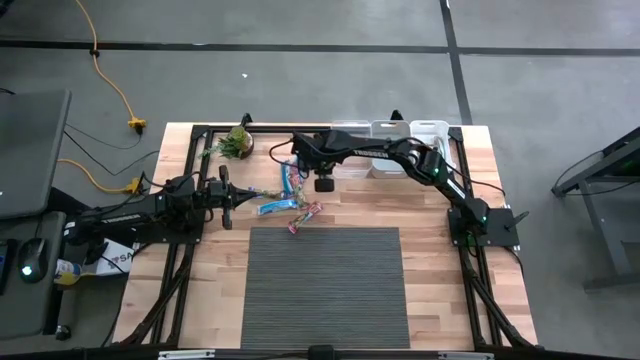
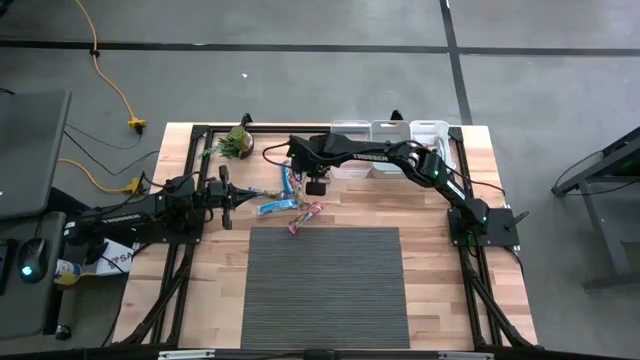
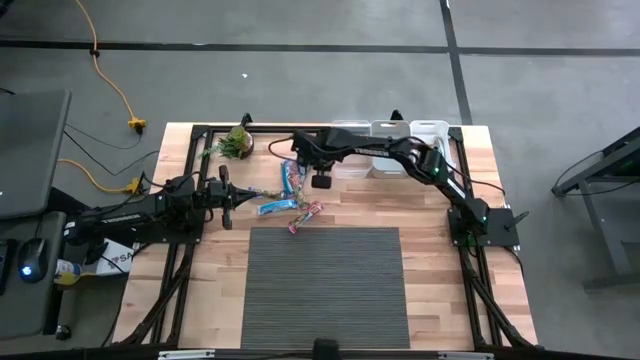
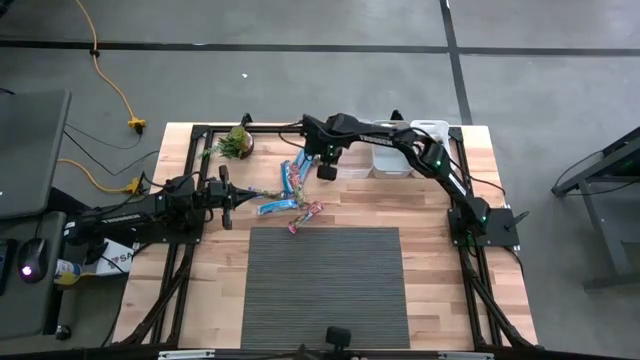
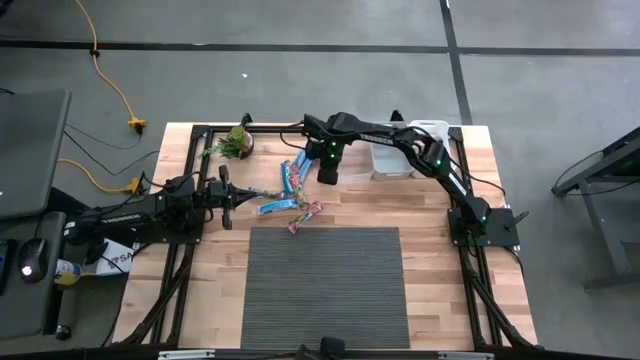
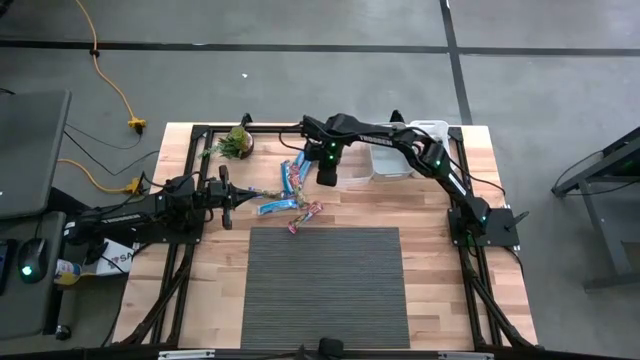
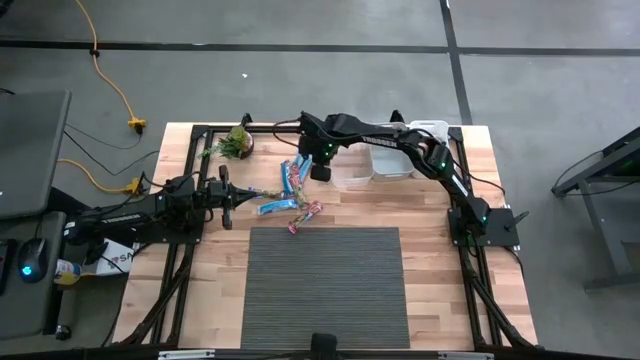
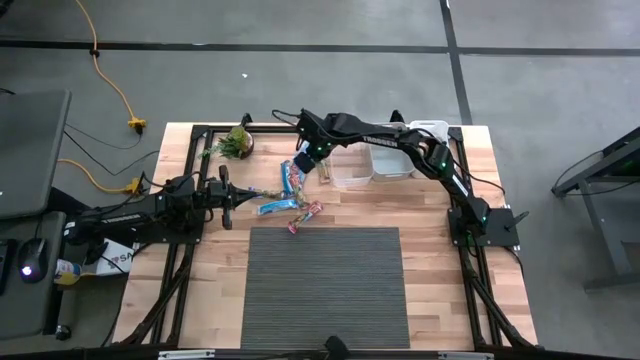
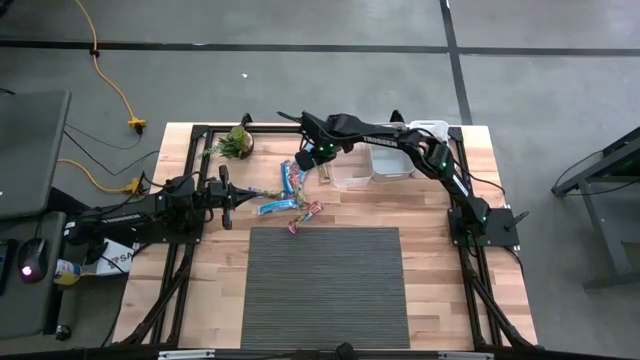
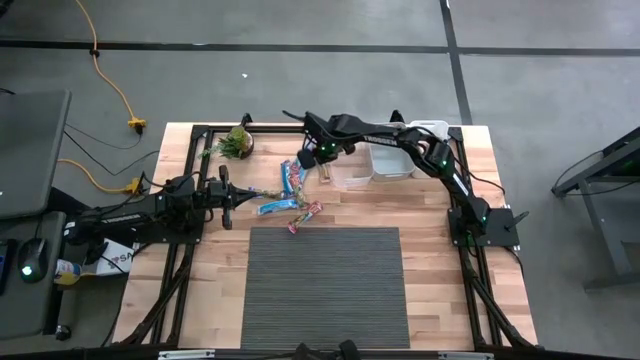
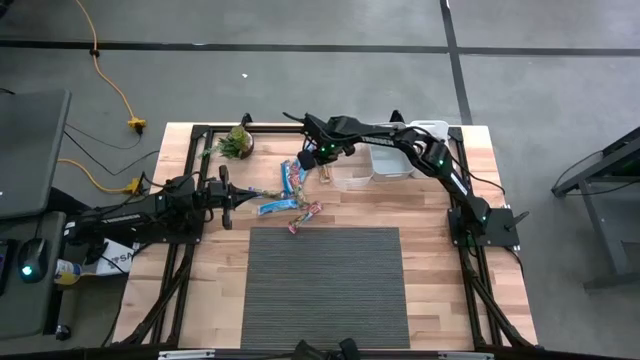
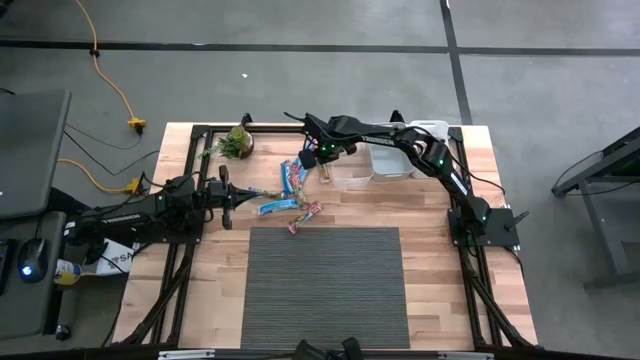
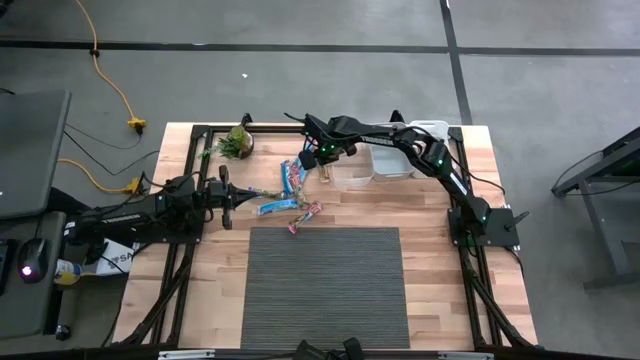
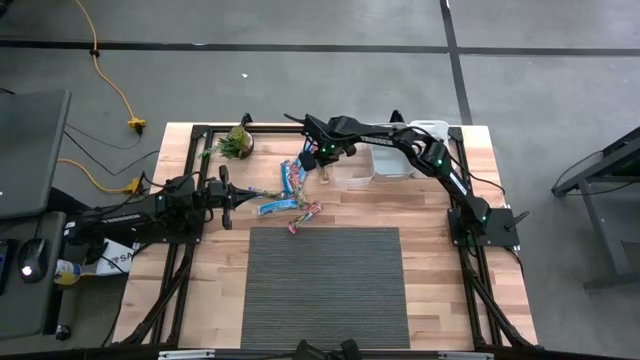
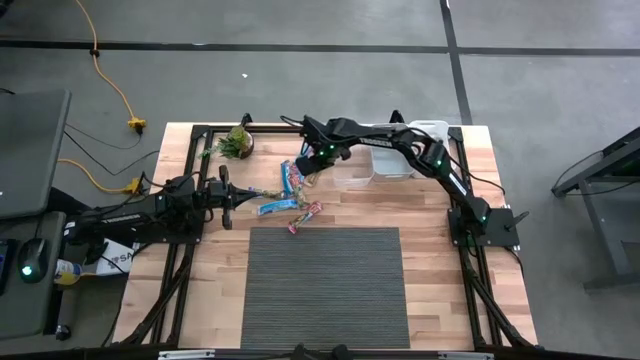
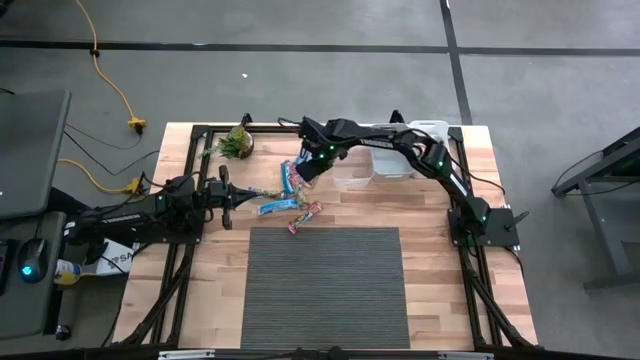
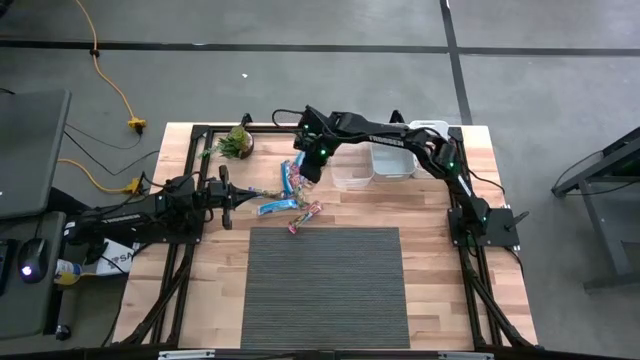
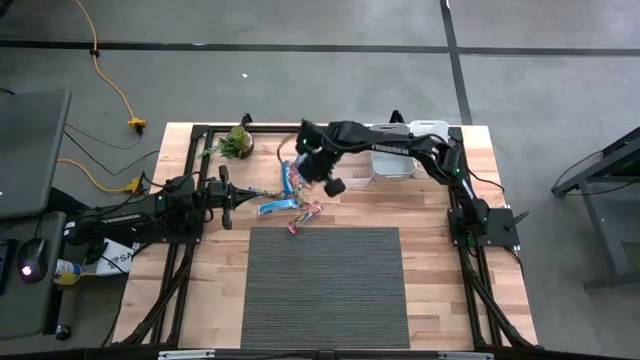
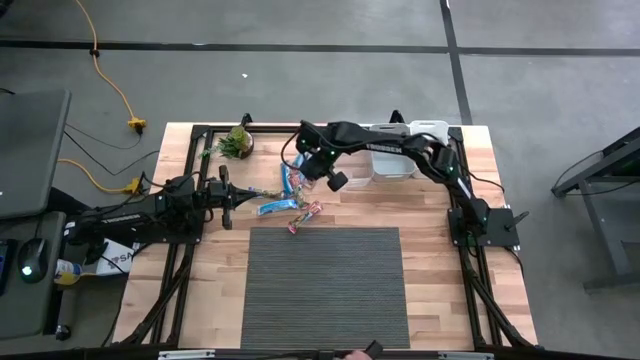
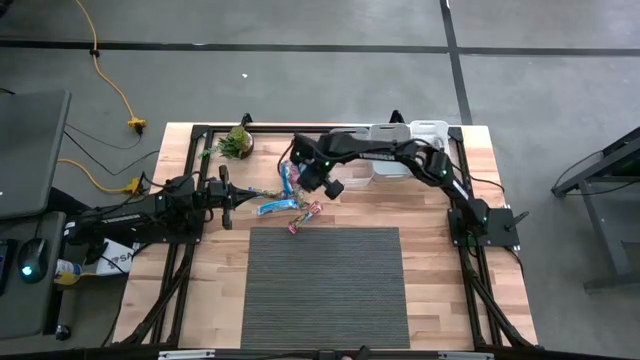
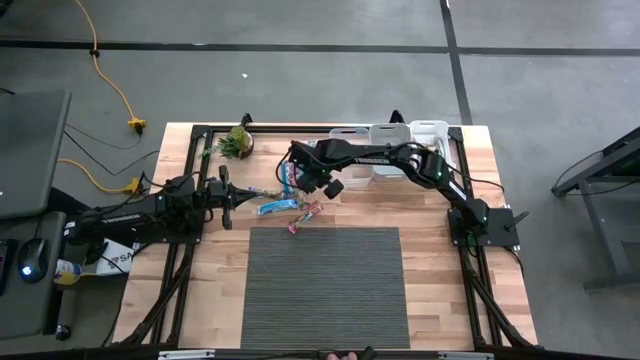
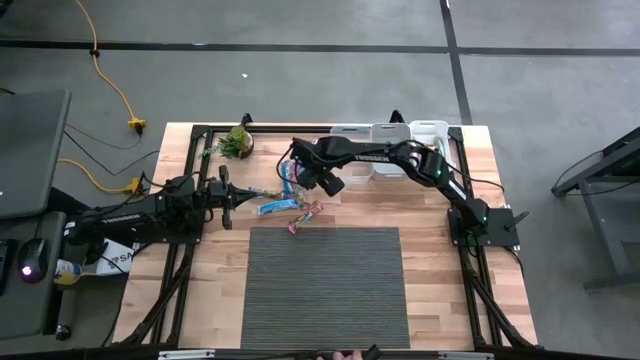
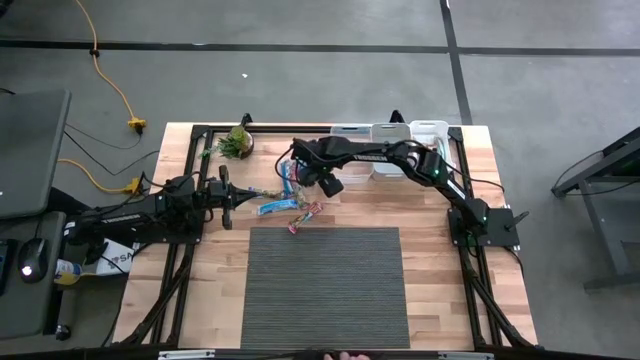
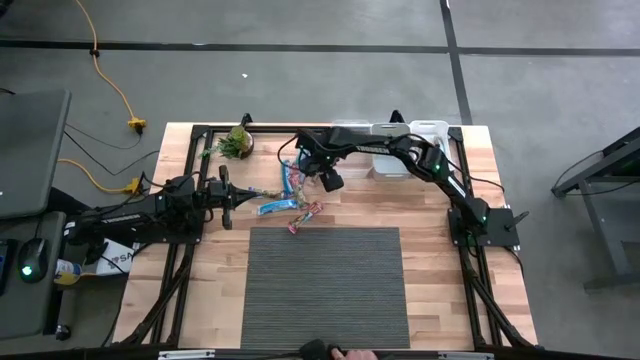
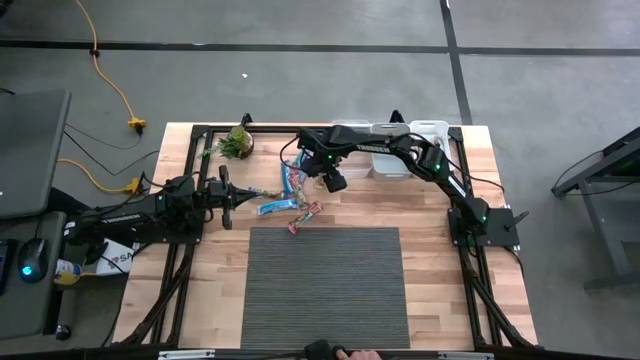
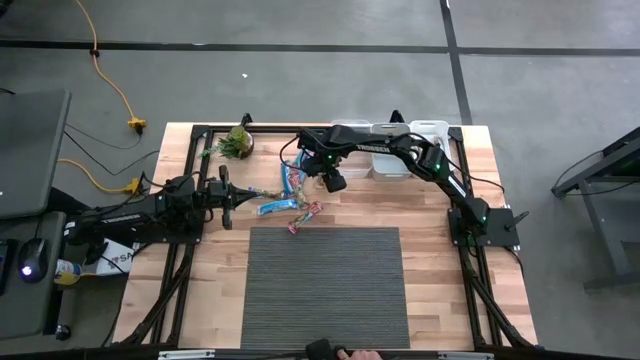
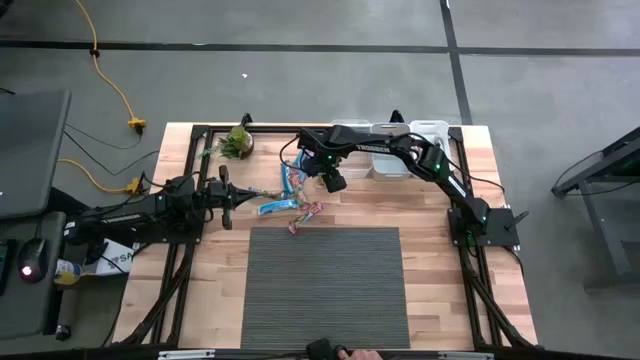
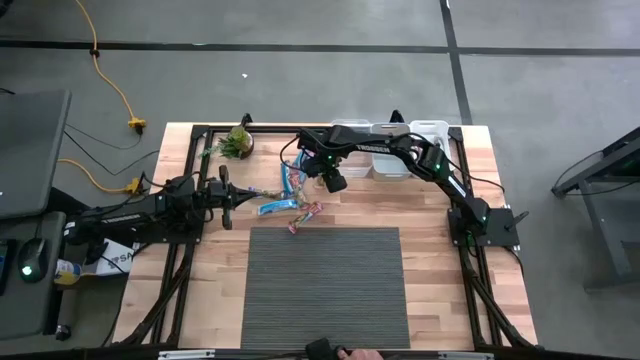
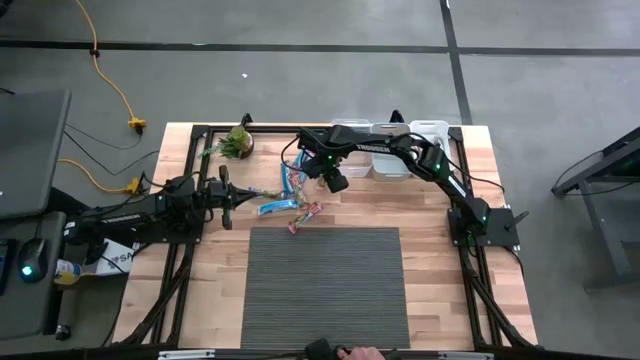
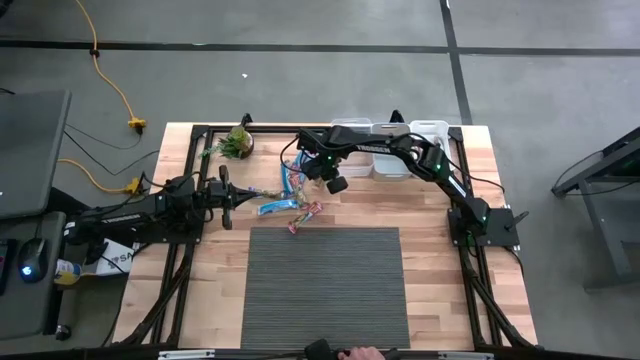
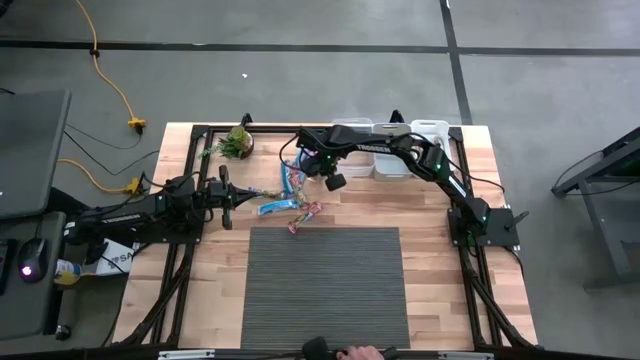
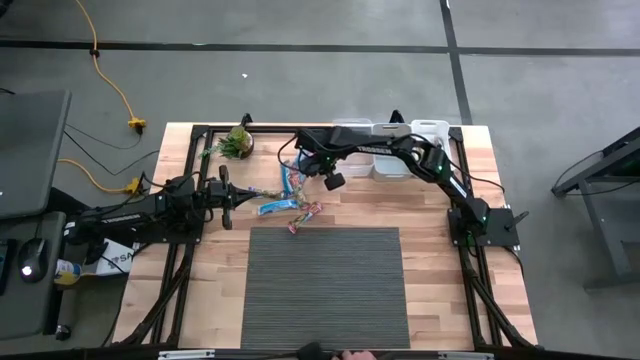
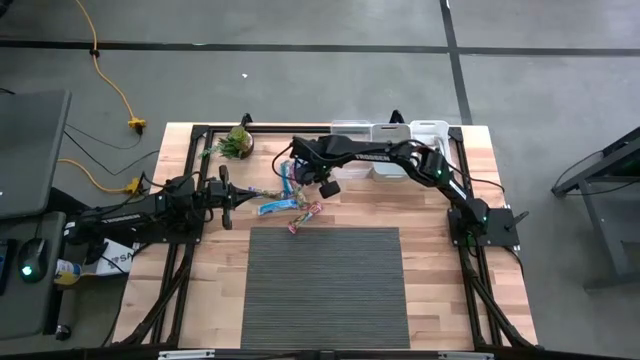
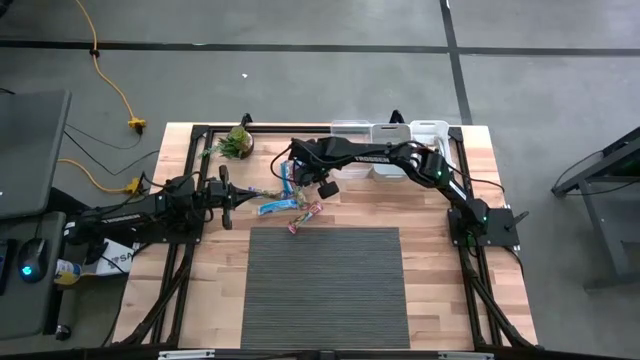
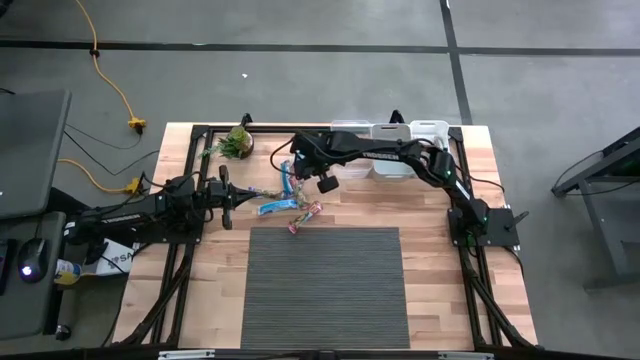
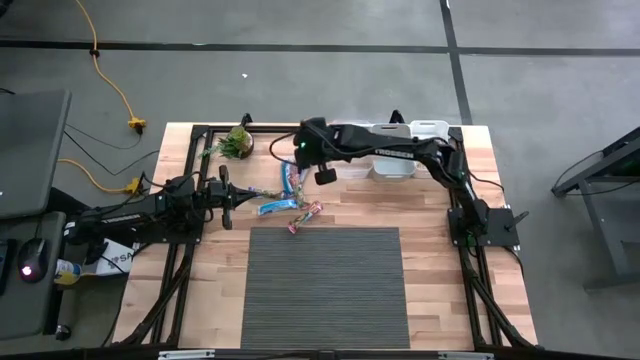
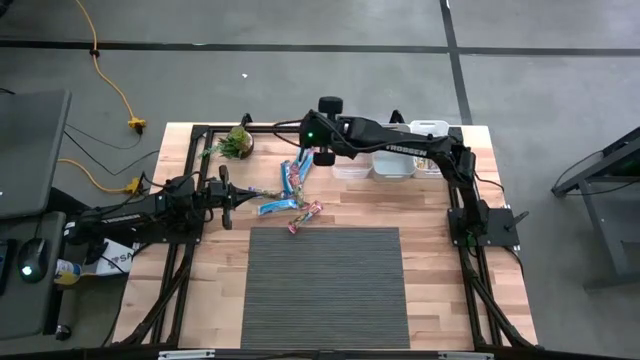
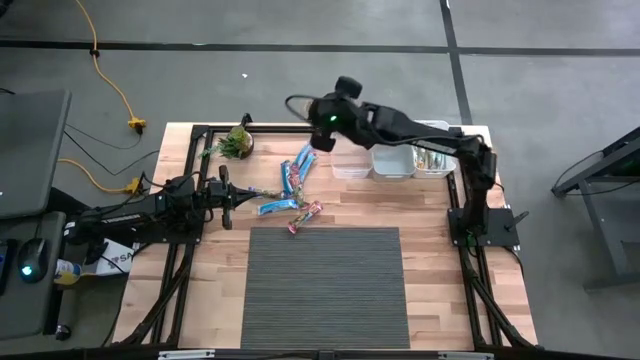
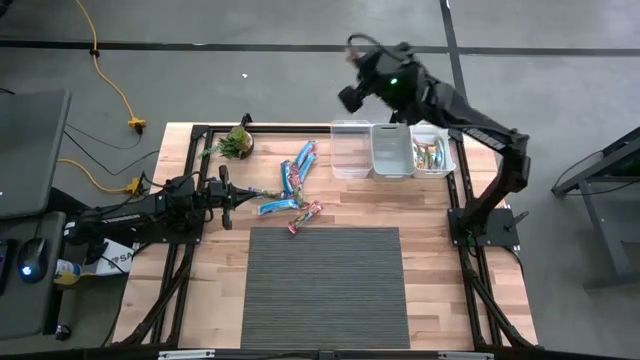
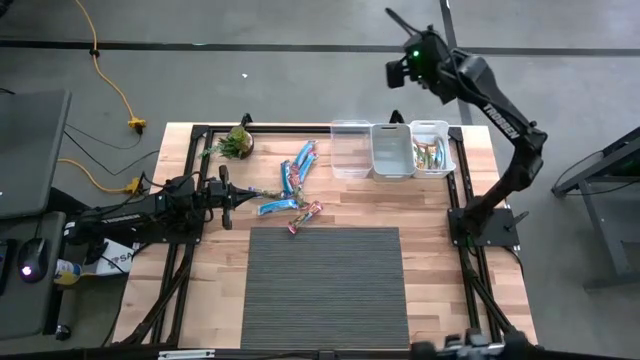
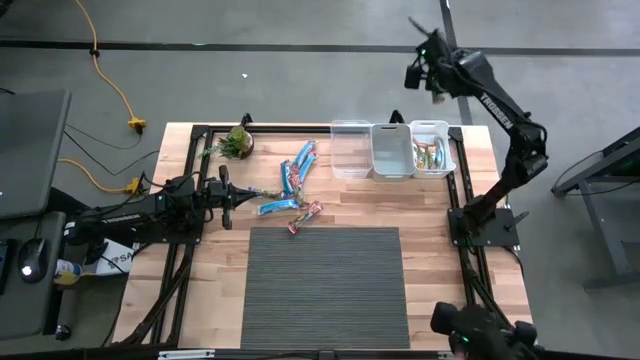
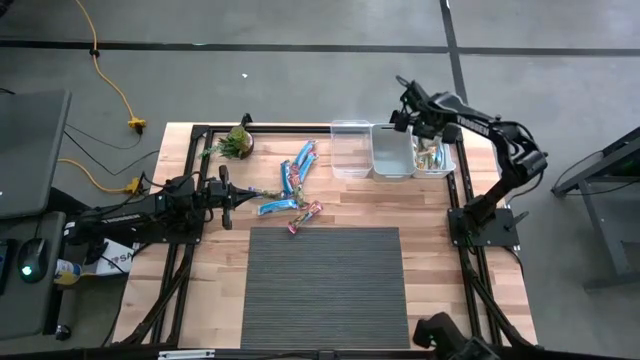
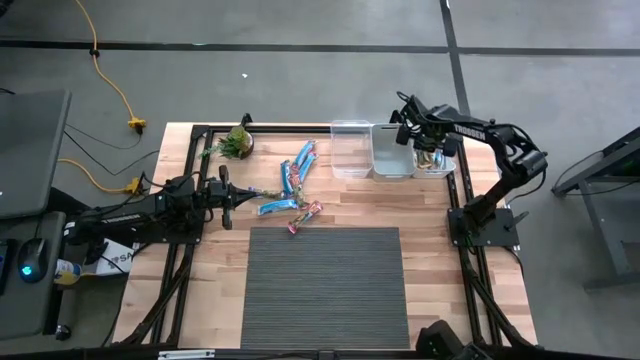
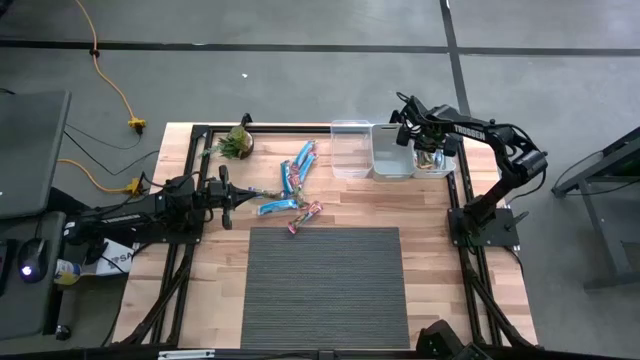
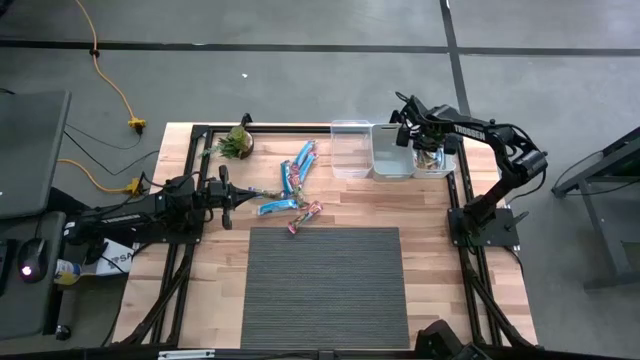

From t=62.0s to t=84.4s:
Task: Pick and place Granola Bars by type
Put the yellow granola bar into the white bin
